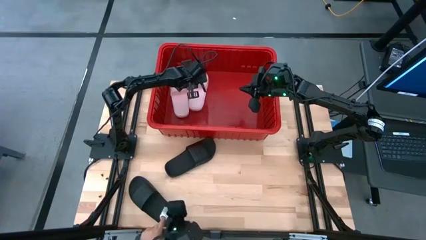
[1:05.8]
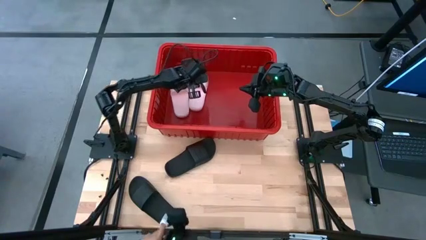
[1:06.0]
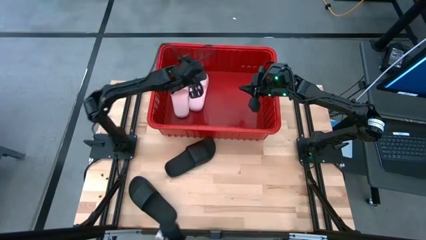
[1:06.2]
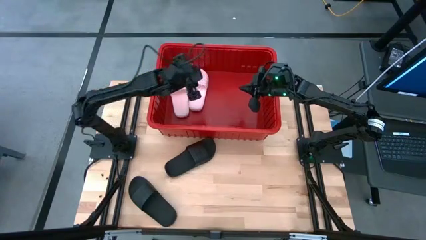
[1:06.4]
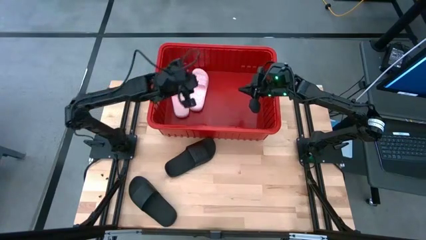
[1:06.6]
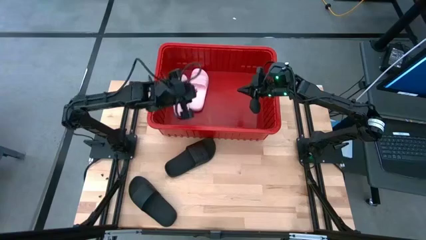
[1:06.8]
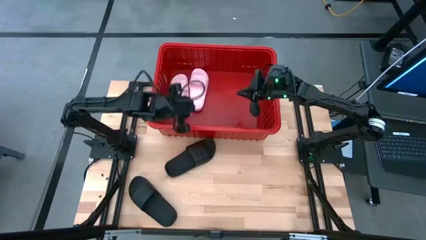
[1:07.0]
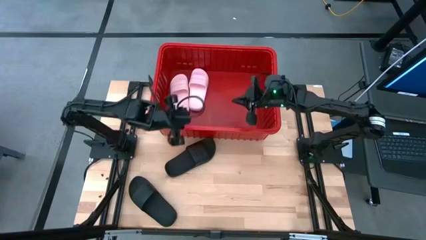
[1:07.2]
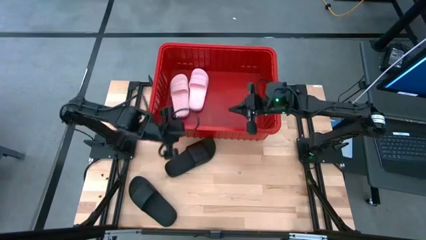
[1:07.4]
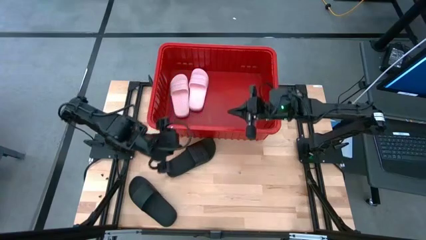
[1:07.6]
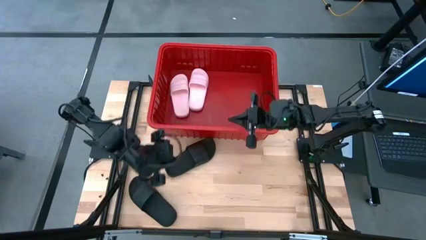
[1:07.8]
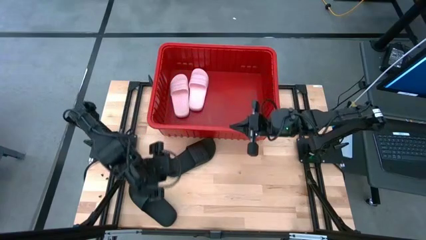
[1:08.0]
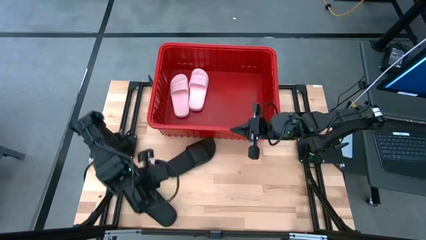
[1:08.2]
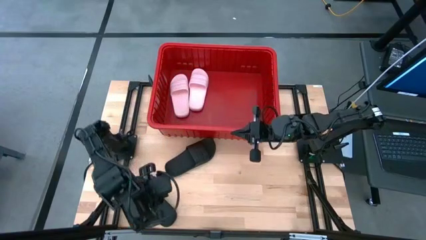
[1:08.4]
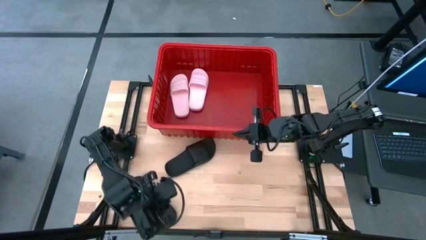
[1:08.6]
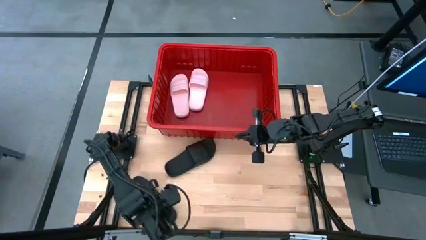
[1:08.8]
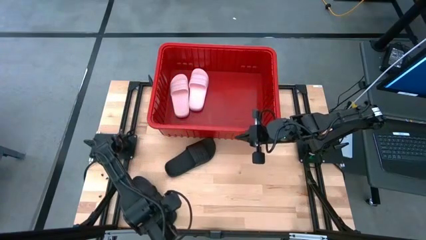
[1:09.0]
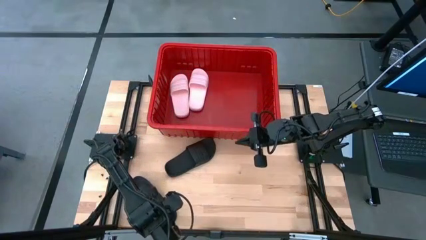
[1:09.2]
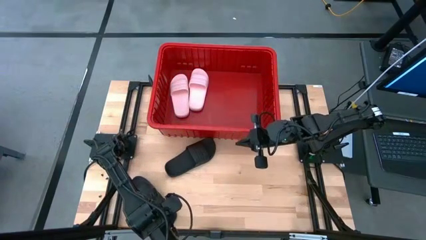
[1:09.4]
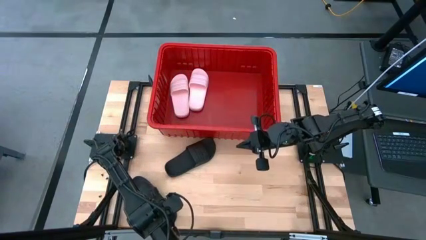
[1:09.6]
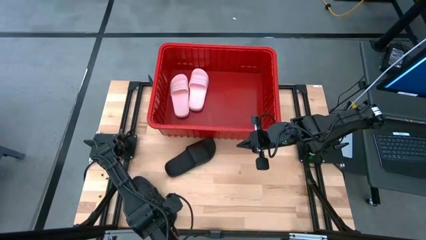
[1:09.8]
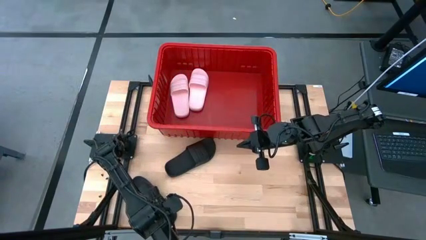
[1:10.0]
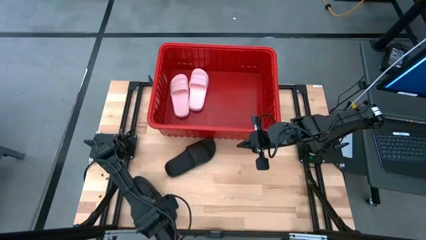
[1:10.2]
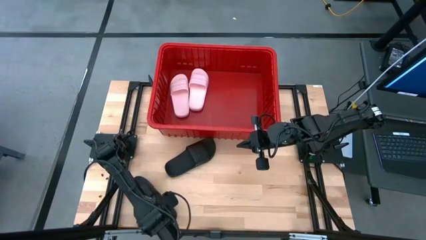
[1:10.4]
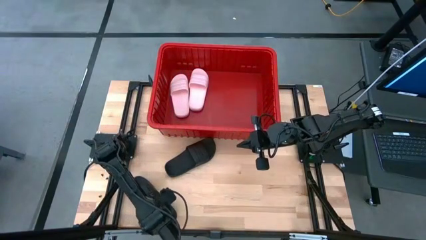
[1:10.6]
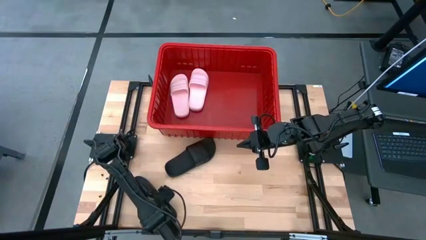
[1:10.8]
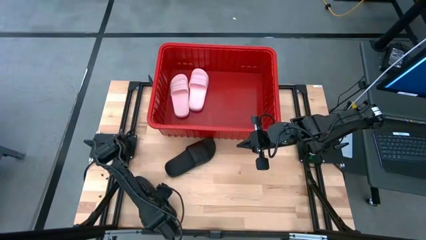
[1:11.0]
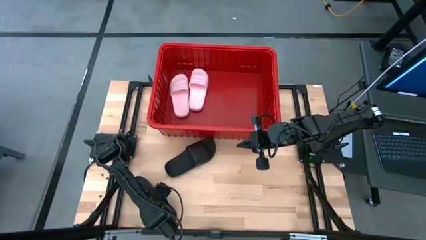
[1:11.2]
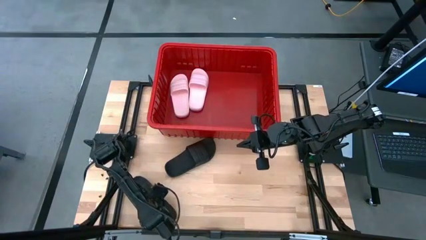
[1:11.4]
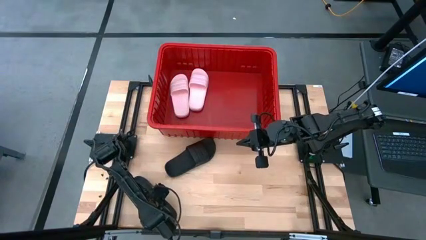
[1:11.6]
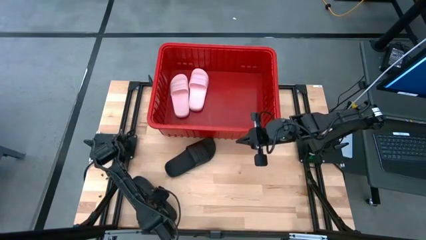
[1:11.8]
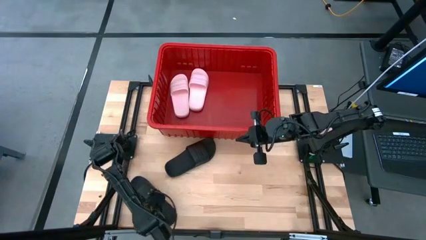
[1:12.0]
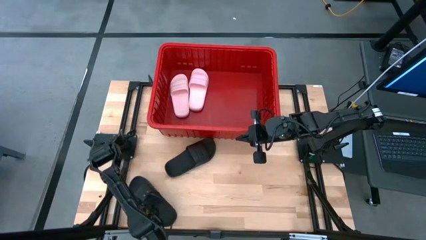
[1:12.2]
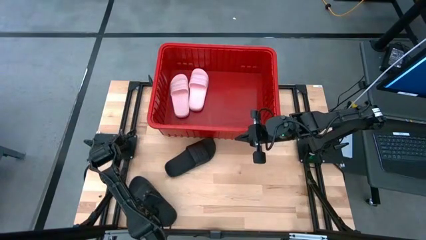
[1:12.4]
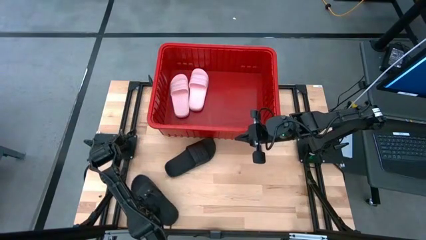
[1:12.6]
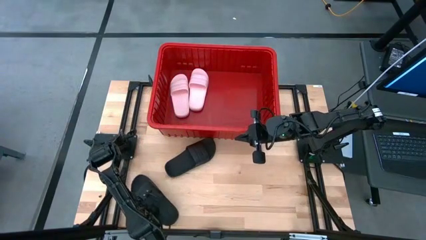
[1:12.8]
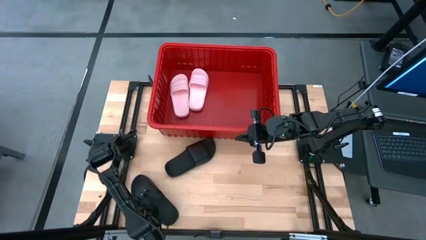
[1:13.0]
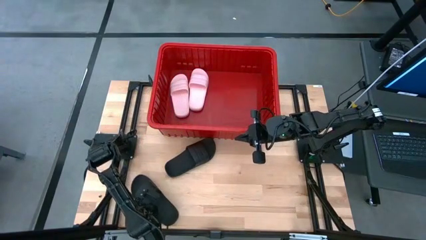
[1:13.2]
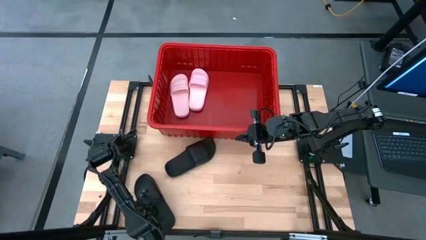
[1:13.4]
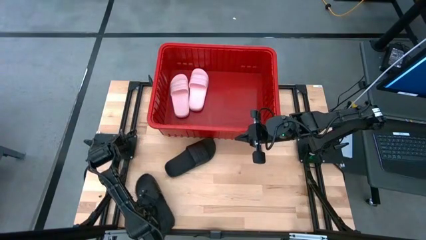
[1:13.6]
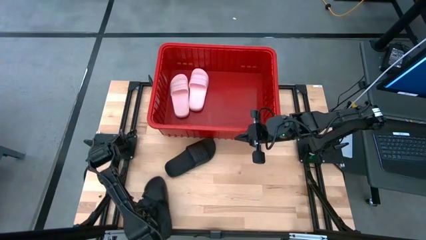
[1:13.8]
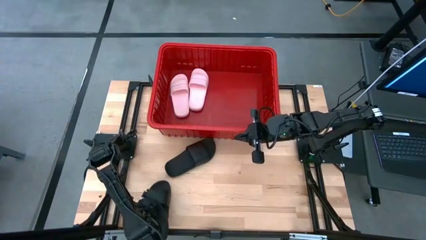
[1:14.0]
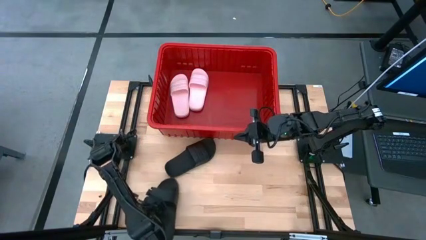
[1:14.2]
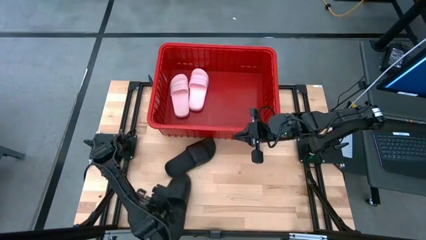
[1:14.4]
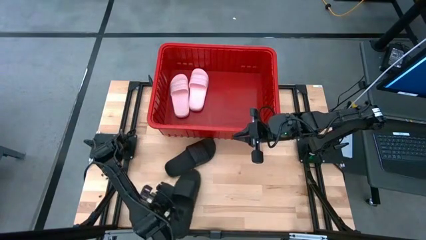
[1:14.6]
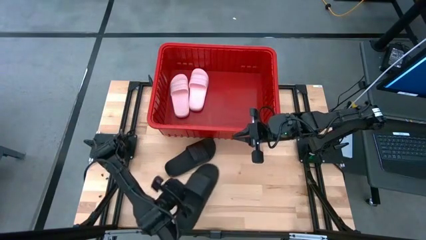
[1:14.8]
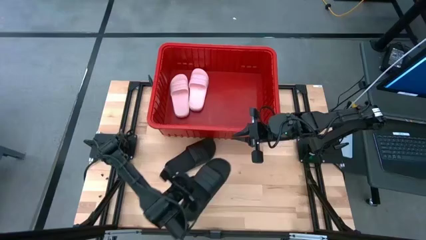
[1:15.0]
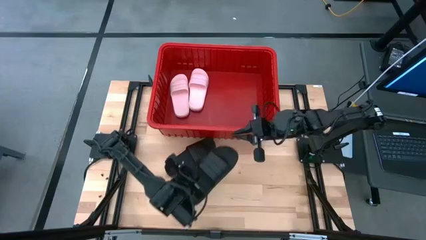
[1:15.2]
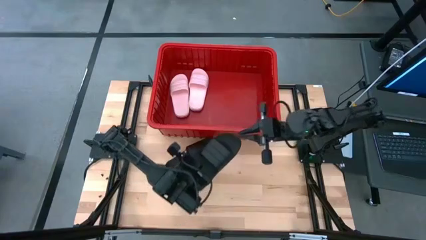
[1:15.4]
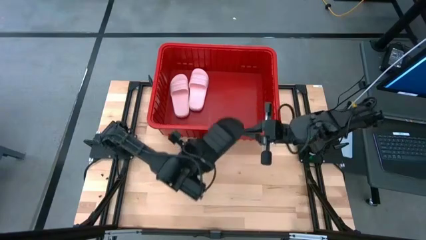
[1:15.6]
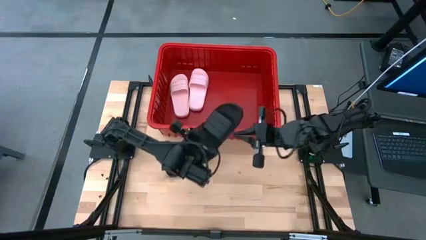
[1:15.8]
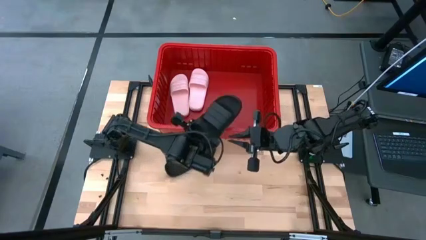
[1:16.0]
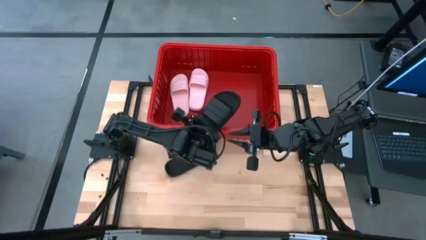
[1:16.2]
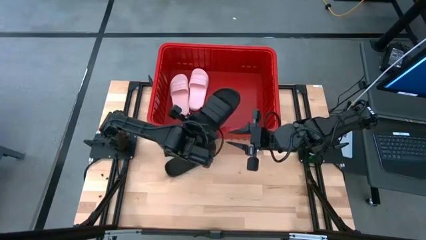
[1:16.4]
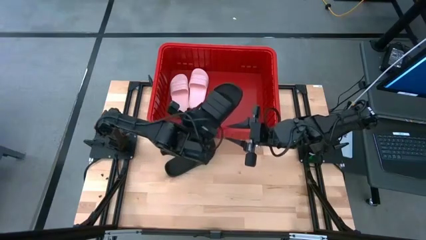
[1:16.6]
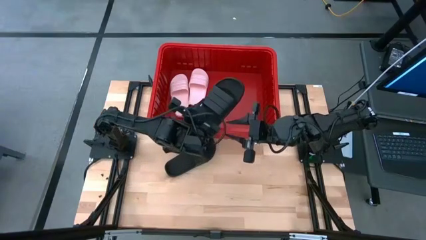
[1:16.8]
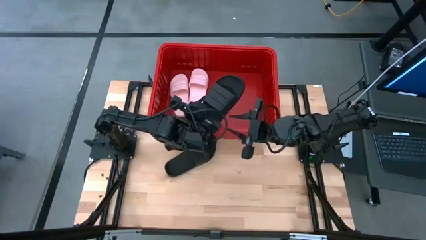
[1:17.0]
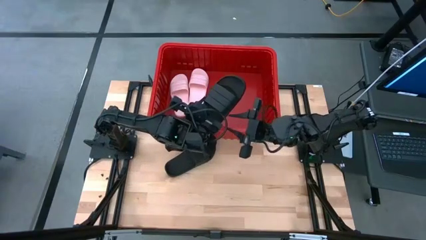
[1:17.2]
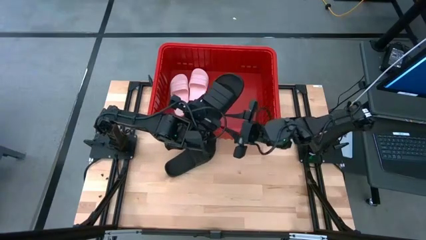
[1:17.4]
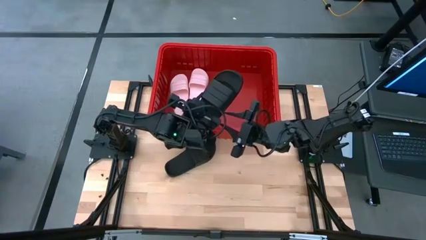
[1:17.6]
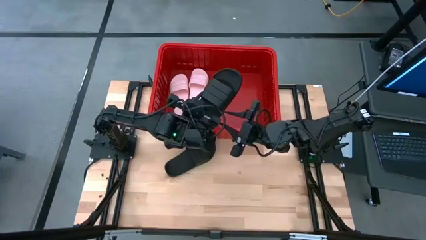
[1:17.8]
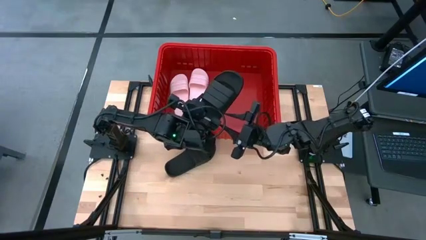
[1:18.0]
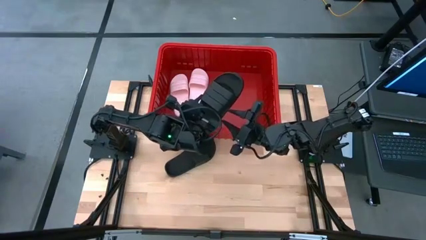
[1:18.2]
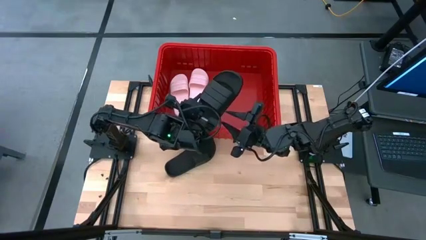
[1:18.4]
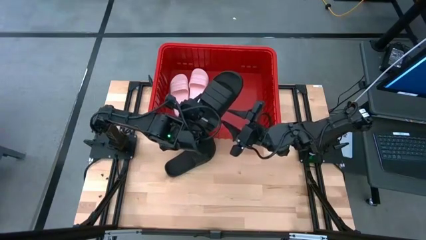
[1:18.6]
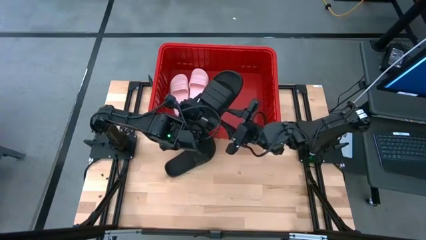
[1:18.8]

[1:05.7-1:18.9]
Task: Pick and place slides into bin
Put the bottom black slide into the red bin
